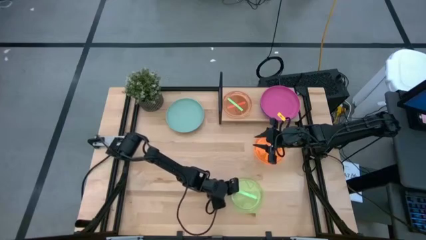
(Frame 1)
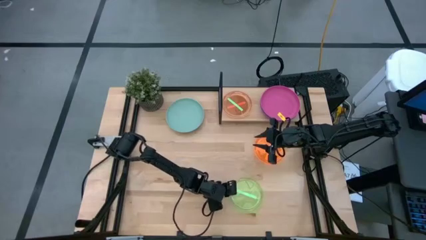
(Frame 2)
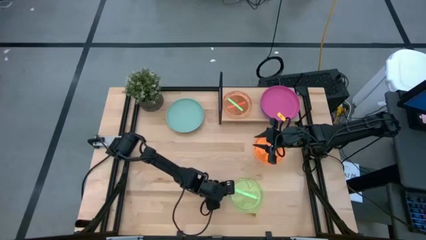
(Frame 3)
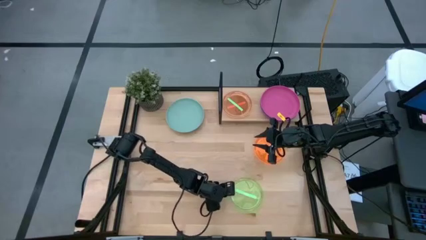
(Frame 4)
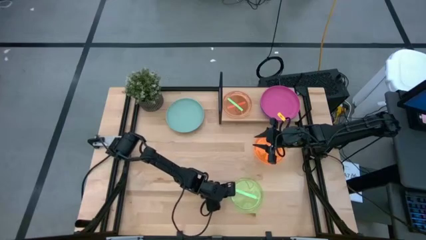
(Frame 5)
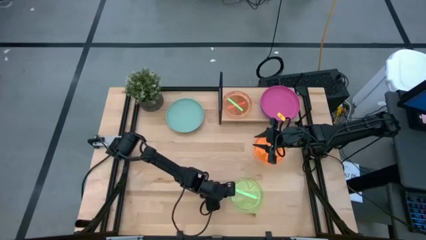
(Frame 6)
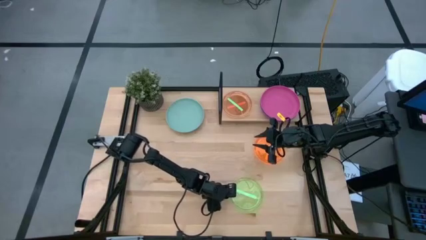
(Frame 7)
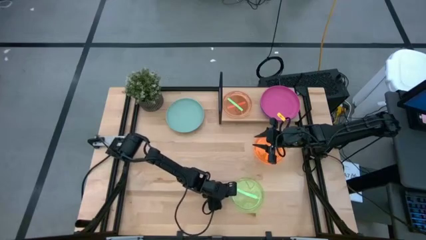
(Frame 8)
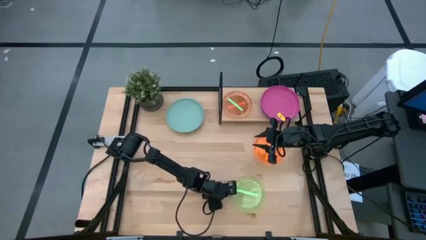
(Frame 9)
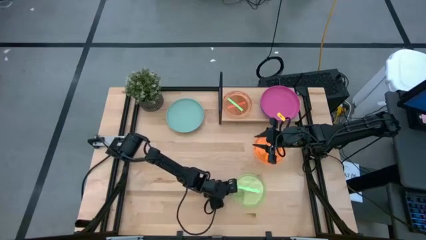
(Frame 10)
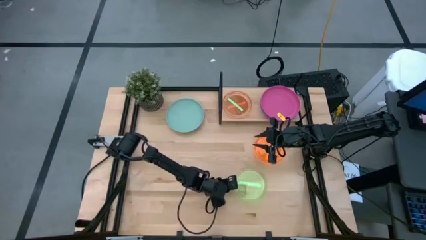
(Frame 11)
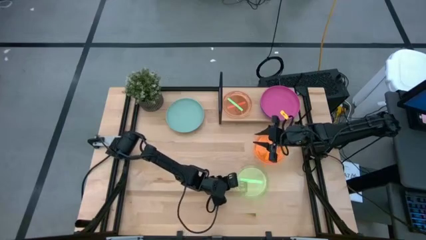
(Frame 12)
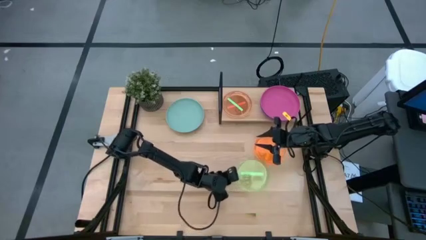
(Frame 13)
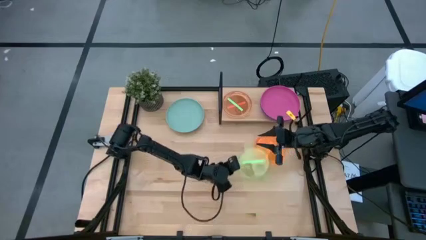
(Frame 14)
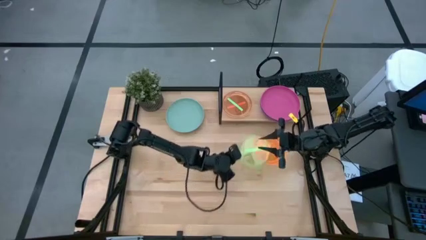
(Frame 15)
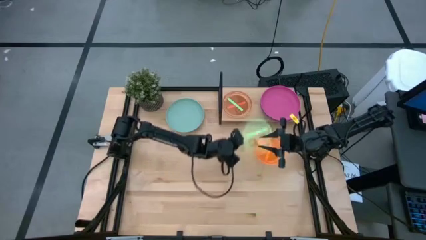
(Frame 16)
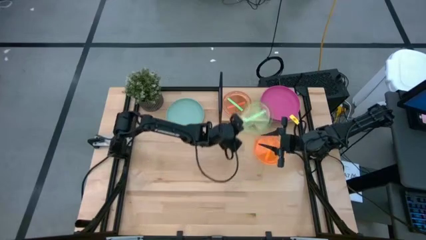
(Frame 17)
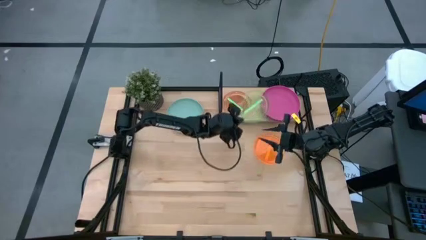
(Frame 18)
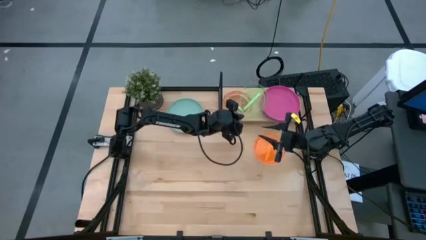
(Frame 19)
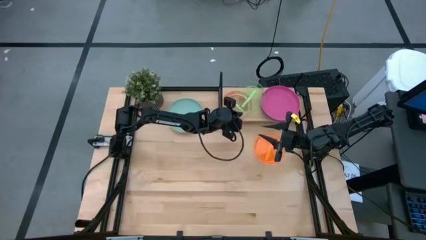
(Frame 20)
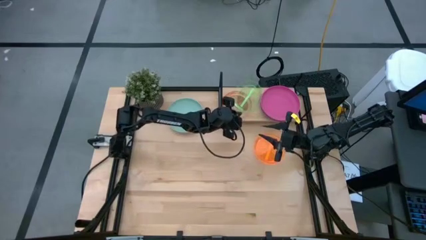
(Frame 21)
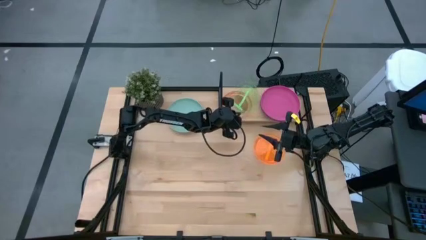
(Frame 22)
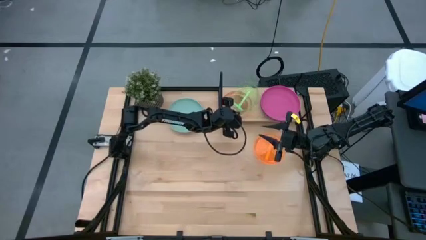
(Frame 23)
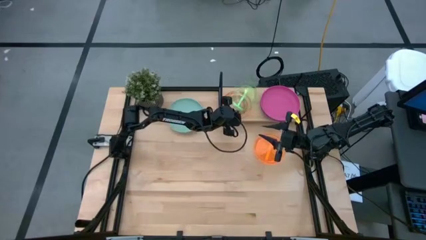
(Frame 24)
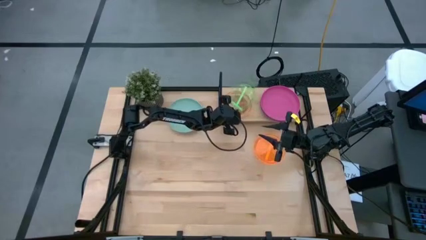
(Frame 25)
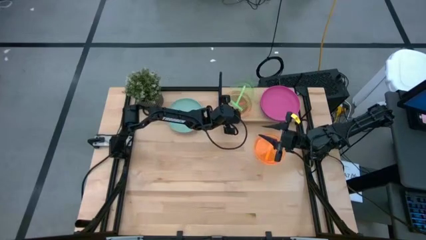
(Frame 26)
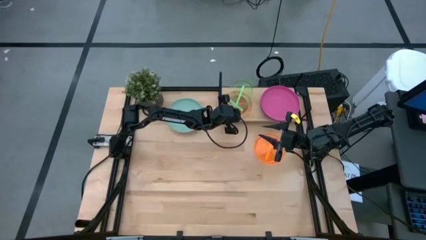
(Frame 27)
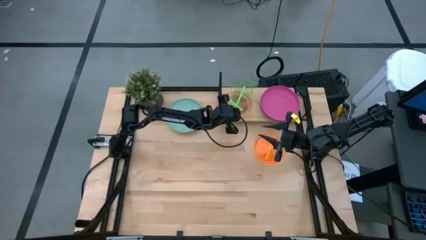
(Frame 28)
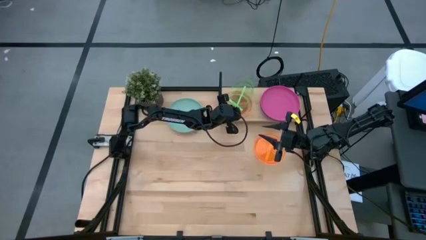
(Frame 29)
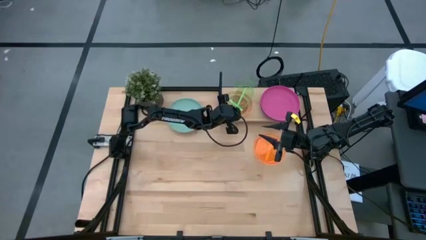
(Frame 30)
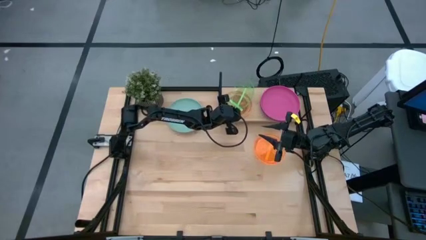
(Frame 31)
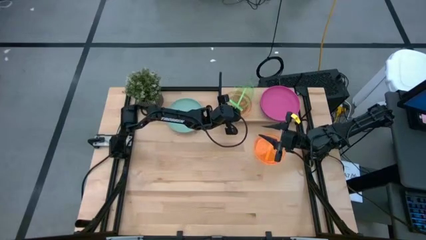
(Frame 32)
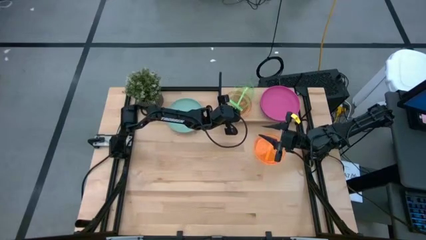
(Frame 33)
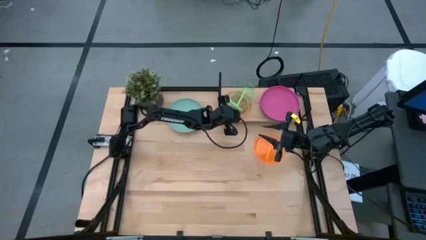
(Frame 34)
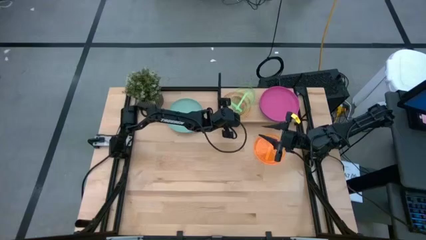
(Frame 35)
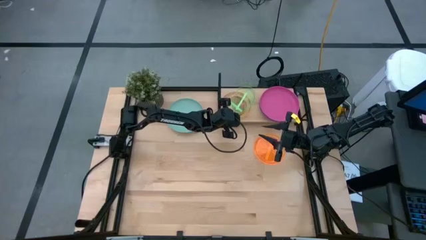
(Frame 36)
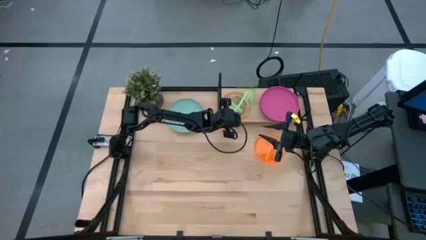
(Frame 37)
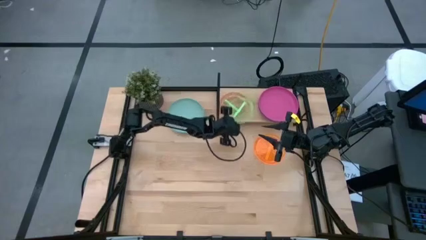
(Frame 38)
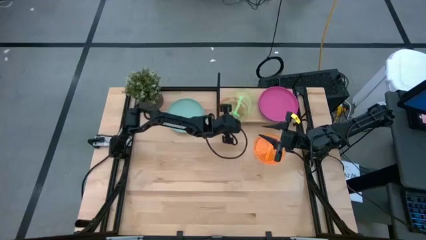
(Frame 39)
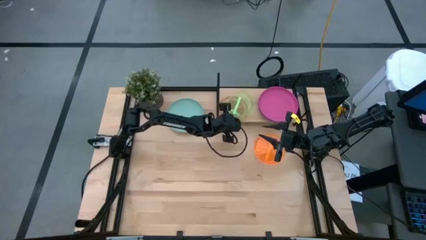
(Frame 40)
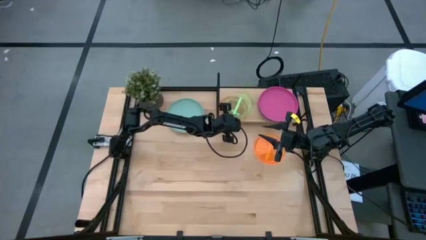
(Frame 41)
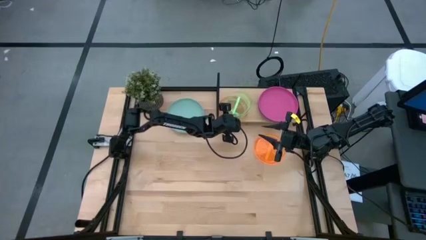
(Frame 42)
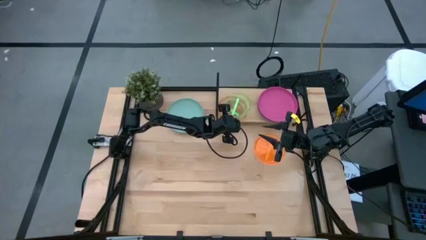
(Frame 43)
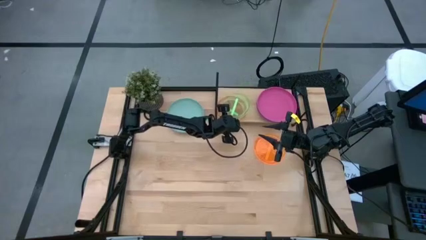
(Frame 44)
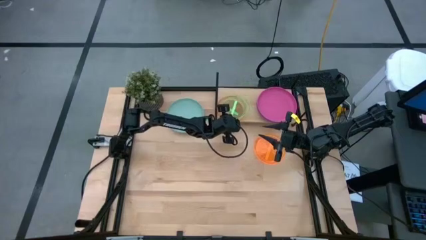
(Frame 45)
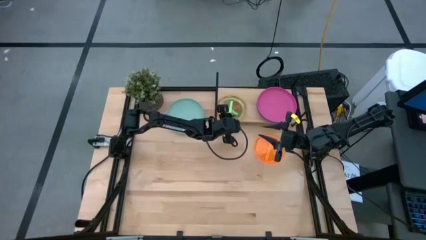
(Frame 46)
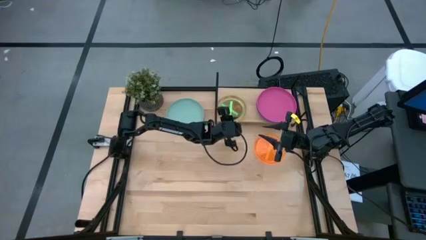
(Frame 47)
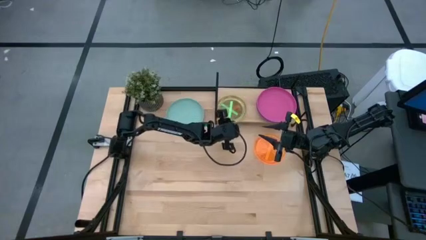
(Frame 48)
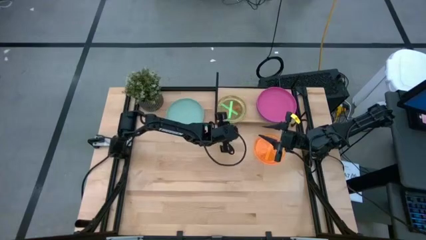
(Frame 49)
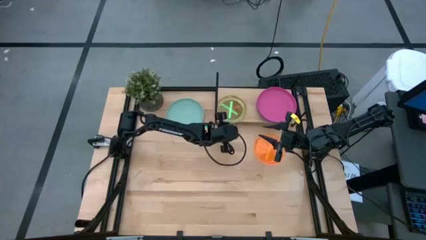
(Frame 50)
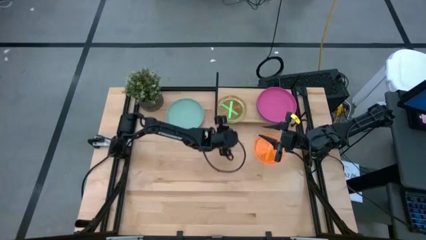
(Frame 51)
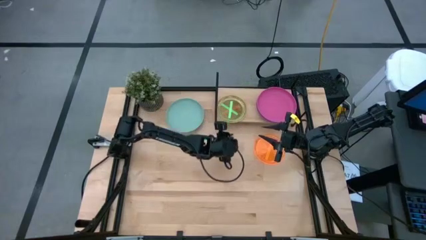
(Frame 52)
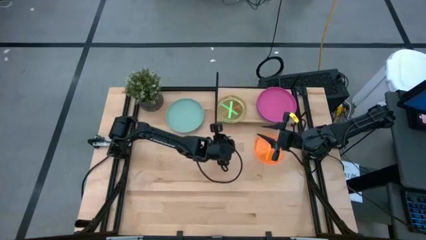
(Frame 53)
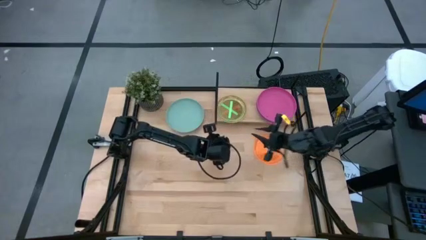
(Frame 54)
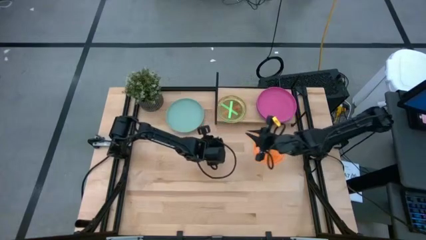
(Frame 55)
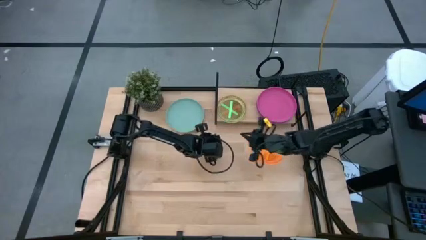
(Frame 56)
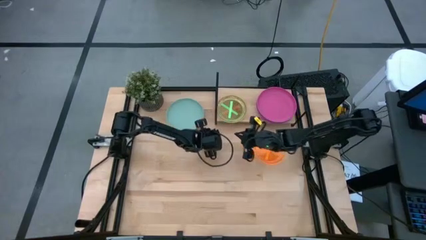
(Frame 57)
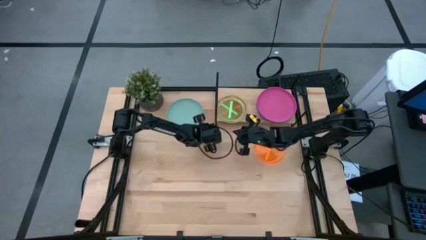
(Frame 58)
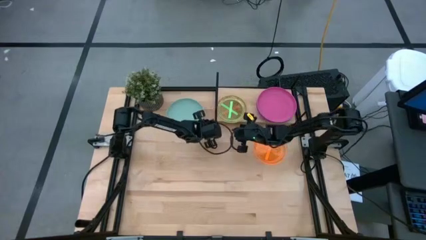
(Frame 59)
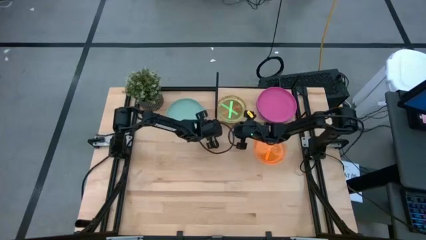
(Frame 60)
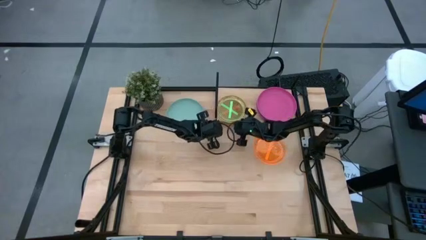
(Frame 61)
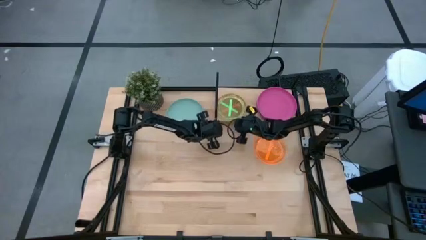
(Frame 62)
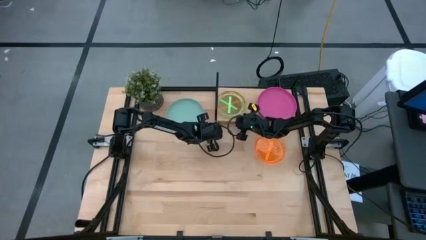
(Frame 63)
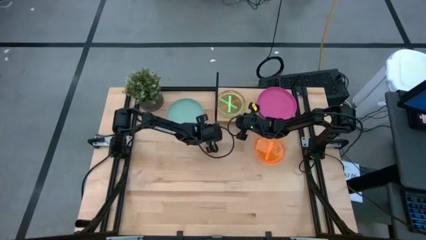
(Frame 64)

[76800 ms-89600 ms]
Task: Place and stack plates onto a shelf
Stack the small green plate on top of the small green plate

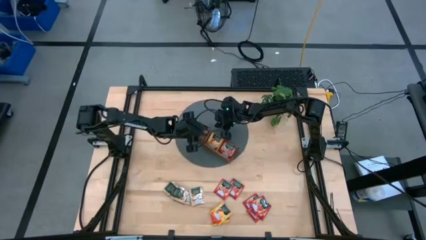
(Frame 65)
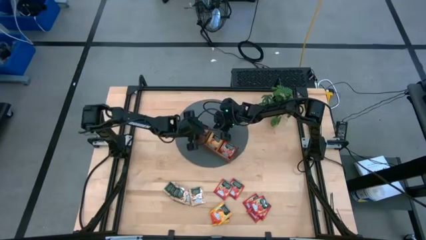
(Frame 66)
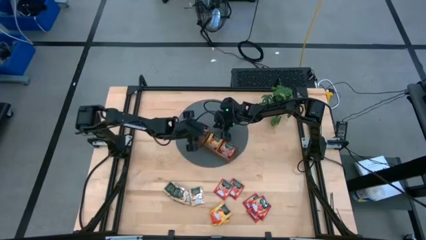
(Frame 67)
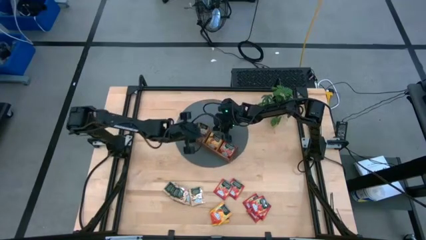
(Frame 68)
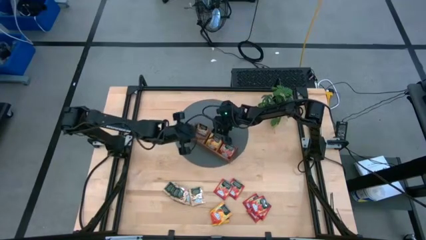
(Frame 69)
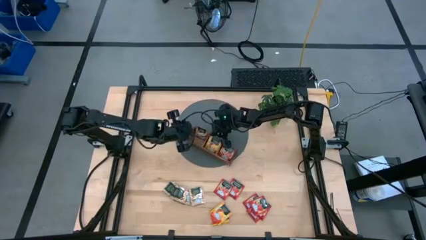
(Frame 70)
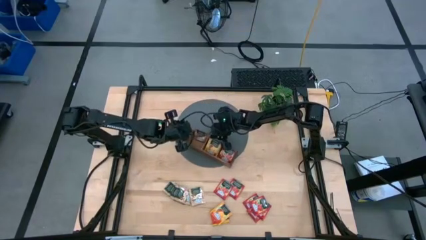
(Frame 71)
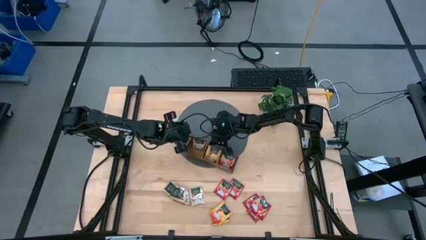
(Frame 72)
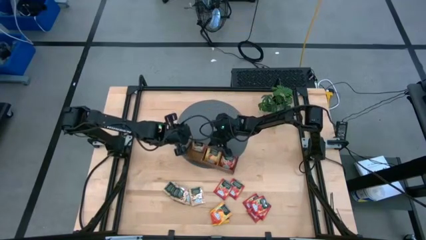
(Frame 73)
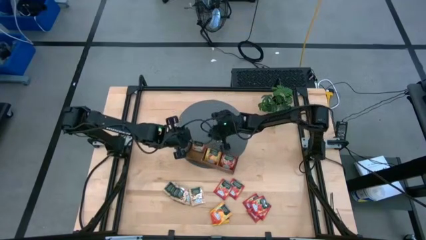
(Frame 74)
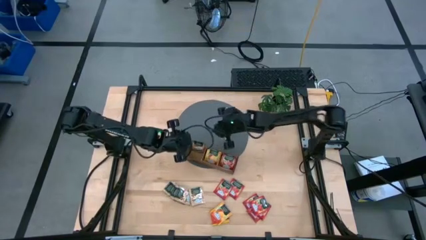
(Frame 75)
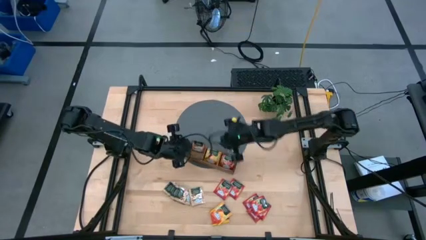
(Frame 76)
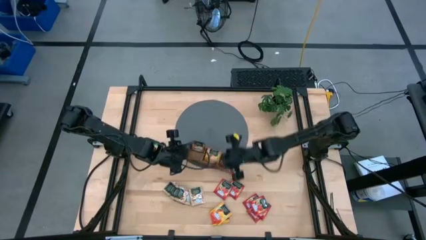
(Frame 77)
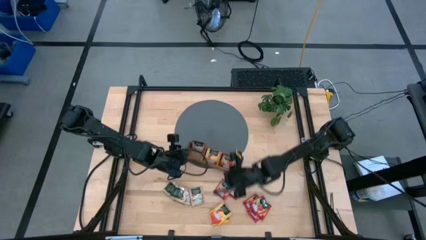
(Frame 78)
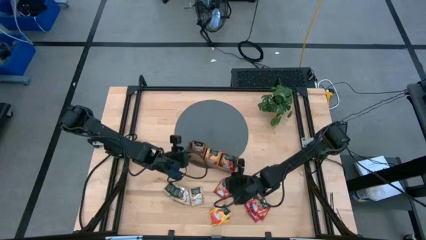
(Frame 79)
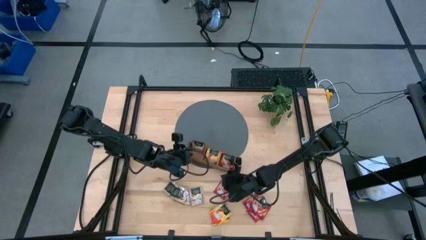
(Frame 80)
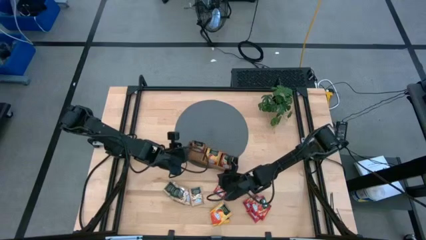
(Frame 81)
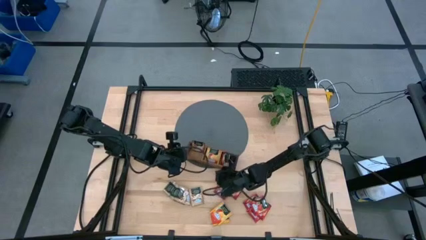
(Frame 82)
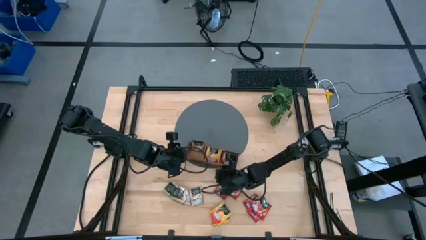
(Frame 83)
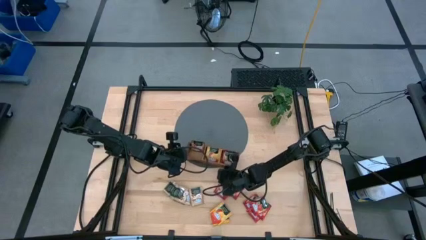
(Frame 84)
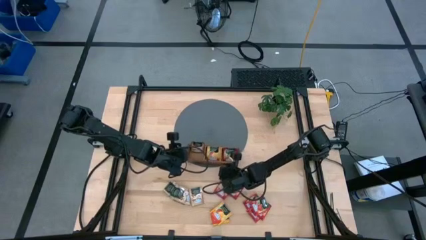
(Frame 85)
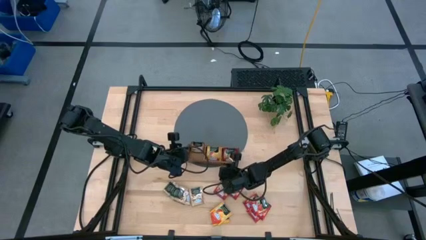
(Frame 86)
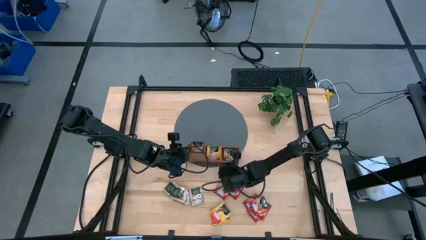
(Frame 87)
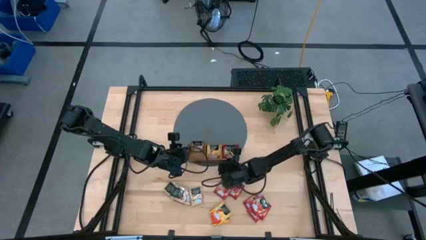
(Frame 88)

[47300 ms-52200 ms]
Task: Pick & Place Tea
Adjust the wooden organizer
